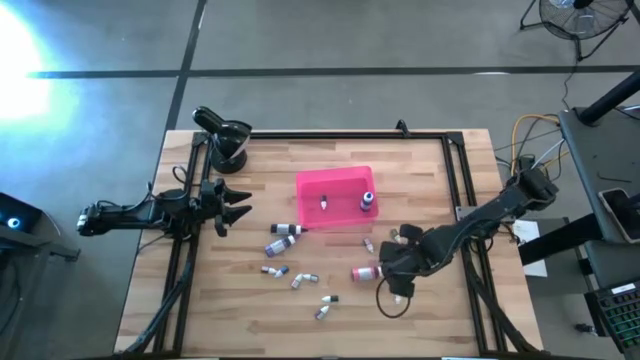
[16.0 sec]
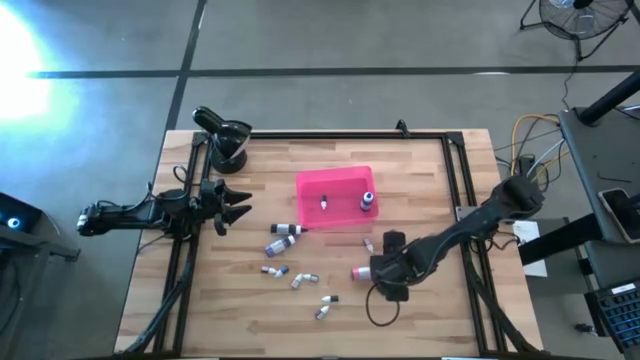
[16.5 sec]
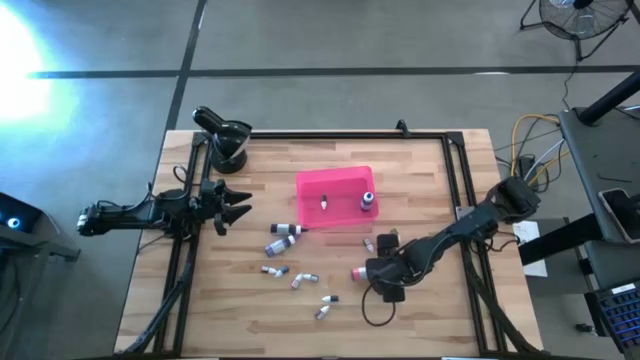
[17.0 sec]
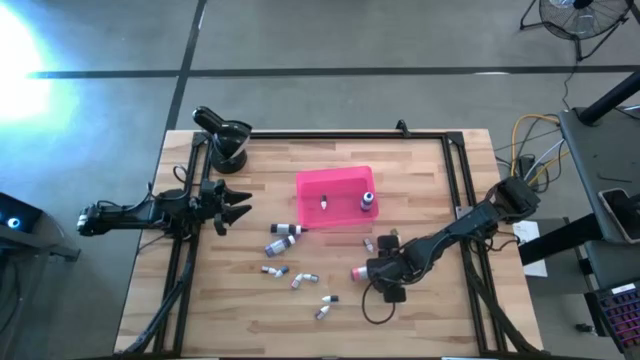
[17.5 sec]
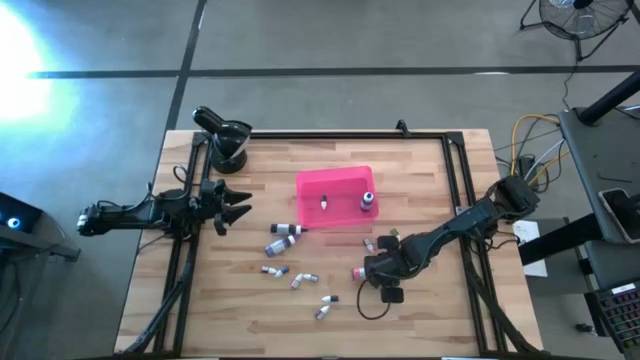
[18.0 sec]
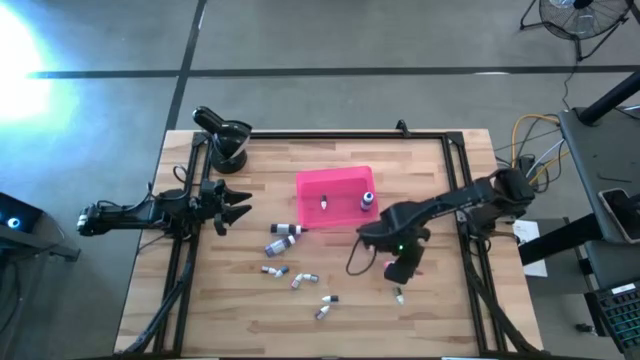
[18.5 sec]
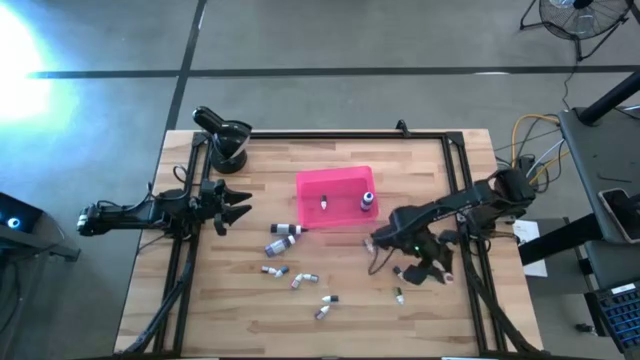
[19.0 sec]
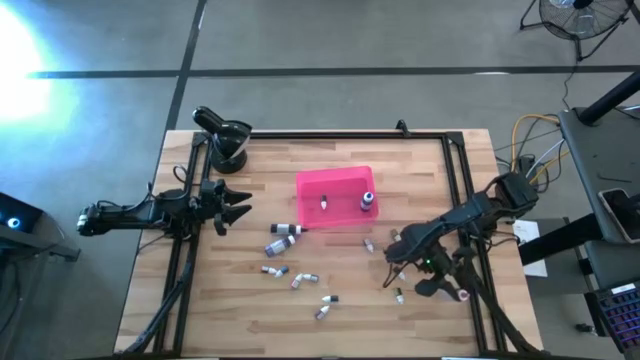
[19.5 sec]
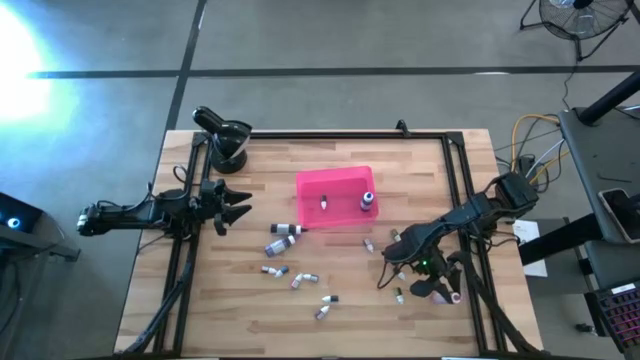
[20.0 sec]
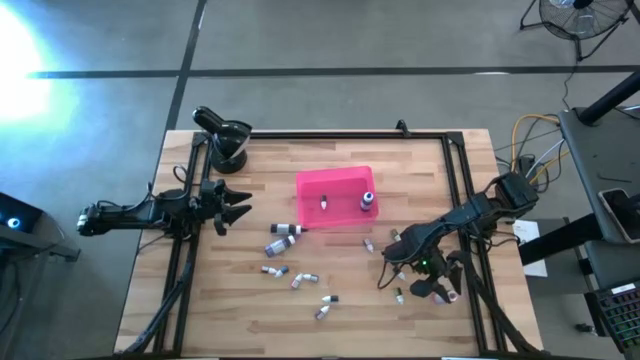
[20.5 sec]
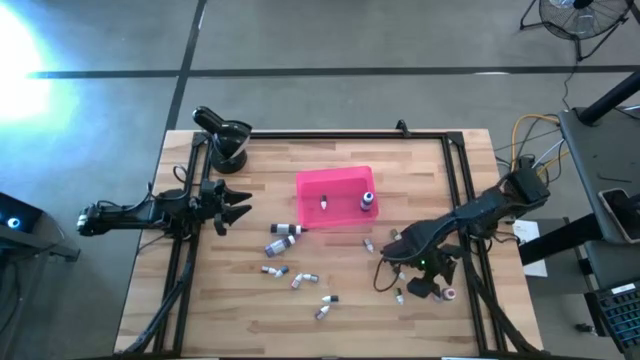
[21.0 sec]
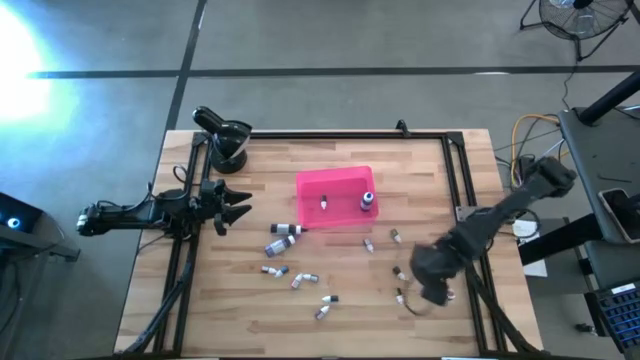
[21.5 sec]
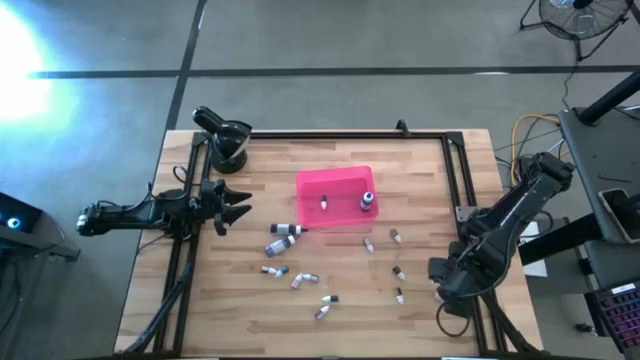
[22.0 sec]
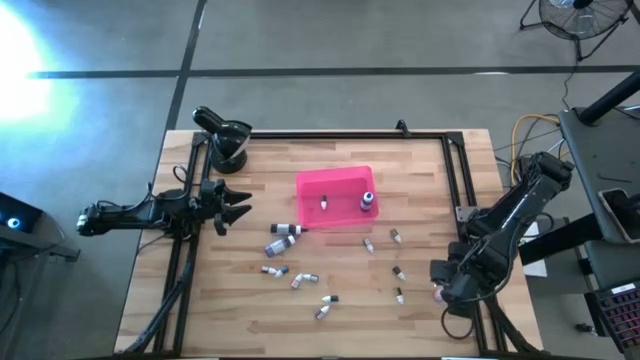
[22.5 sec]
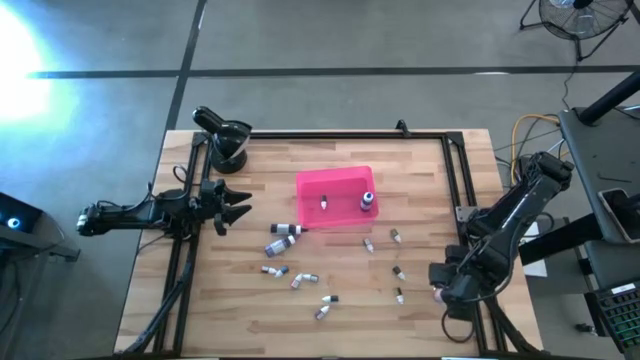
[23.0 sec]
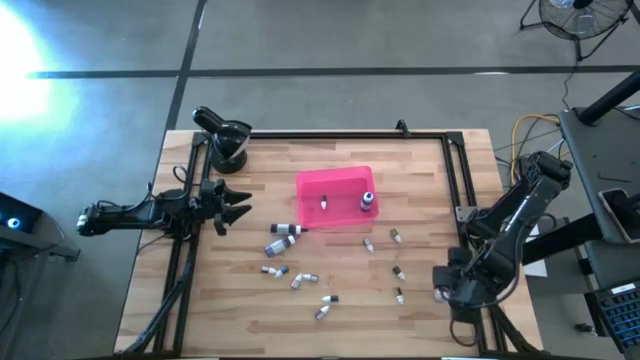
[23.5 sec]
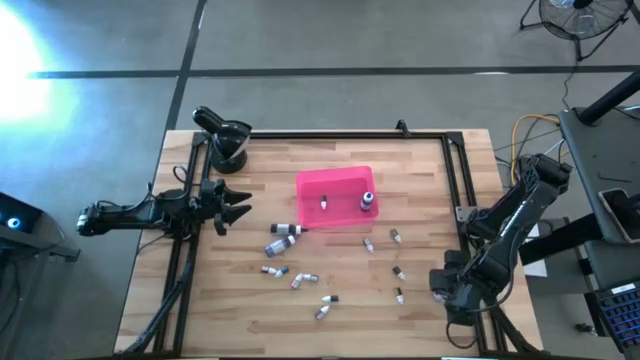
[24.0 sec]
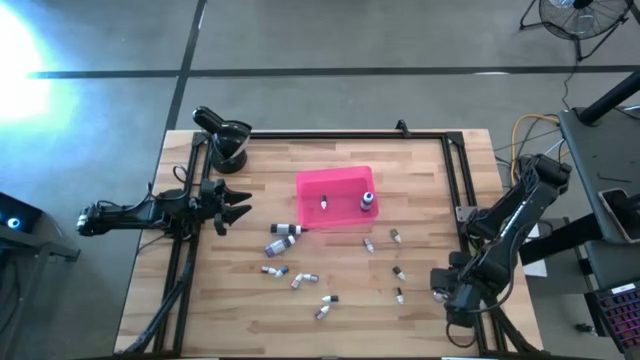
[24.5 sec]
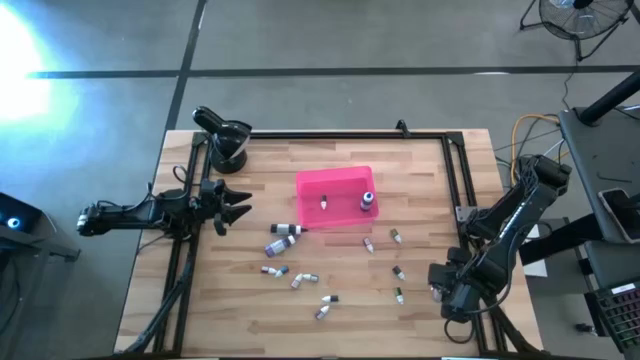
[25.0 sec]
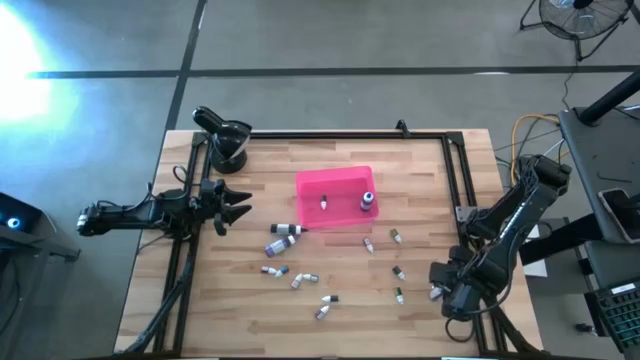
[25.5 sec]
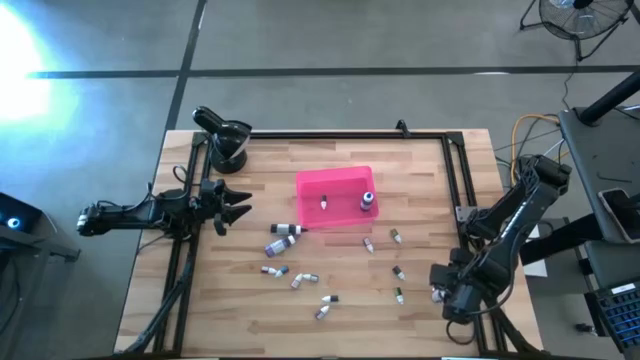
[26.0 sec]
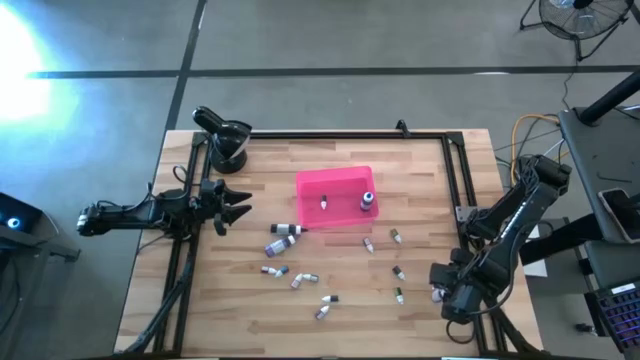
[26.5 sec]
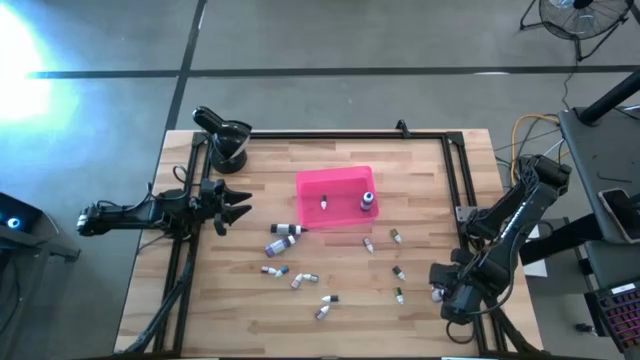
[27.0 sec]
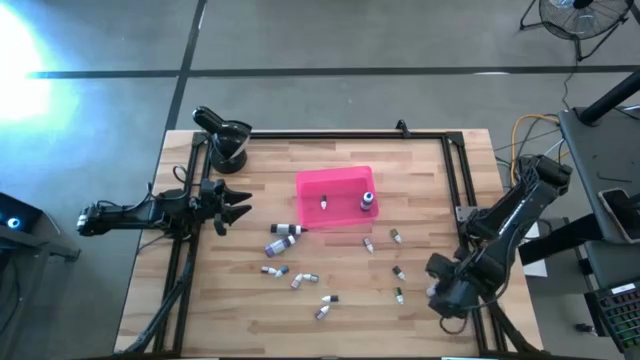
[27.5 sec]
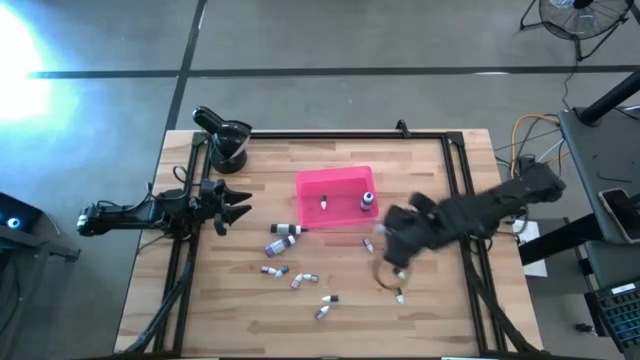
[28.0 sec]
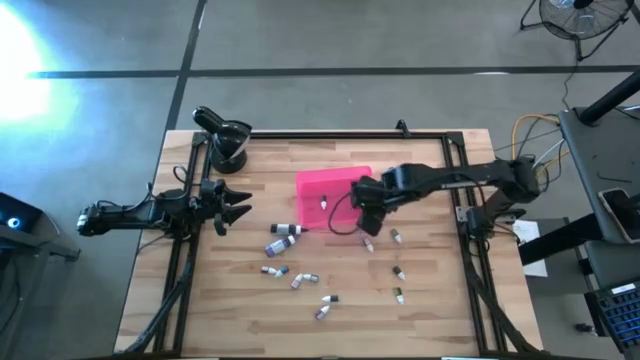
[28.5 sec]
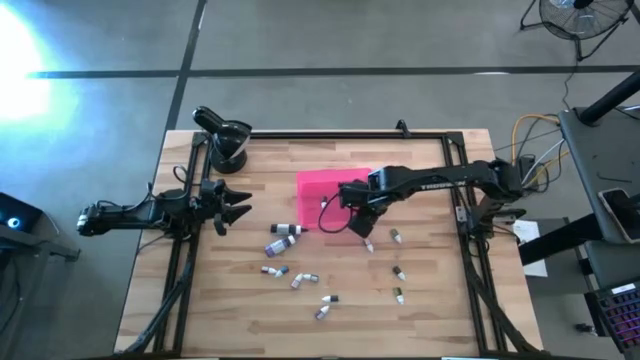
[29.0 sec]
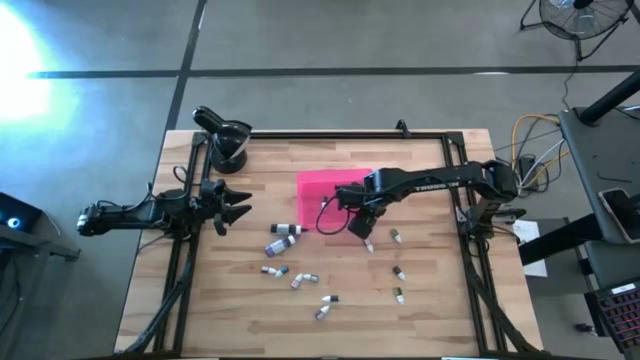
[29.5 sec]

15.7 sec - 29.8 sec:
Task: Pick & Place food coloring
Put the large pink food coloring bottle into the pink bin

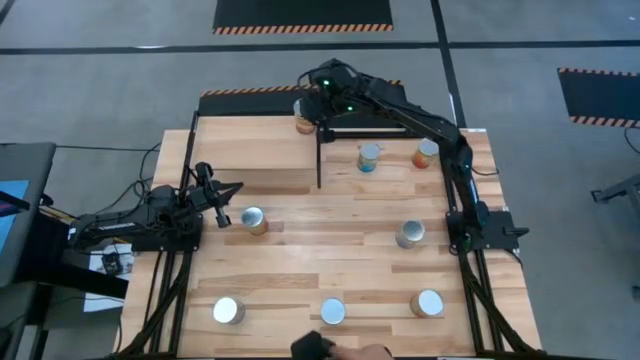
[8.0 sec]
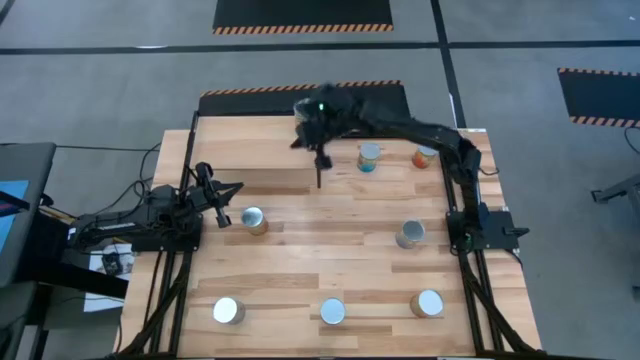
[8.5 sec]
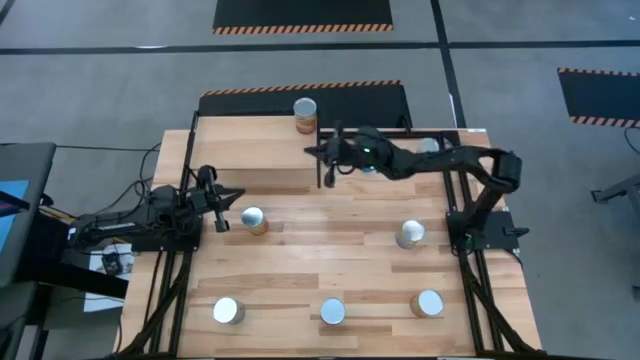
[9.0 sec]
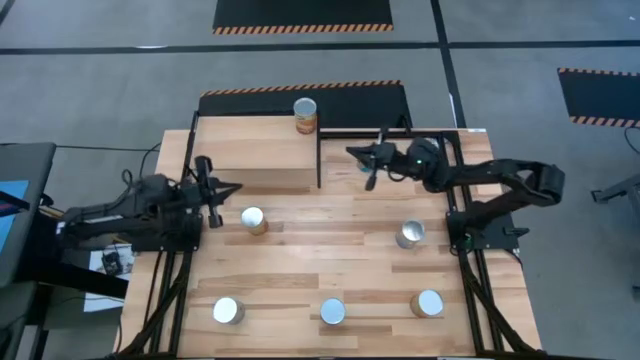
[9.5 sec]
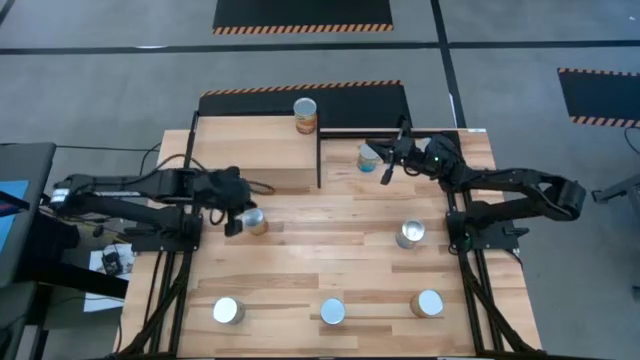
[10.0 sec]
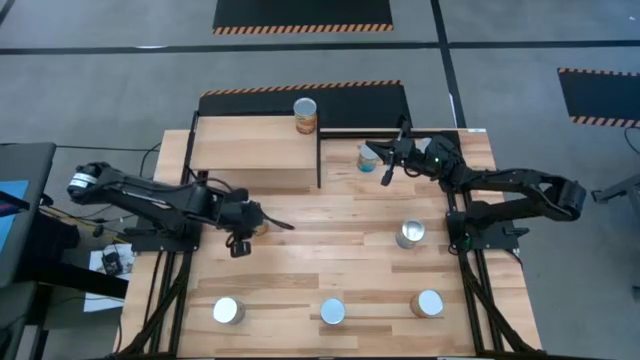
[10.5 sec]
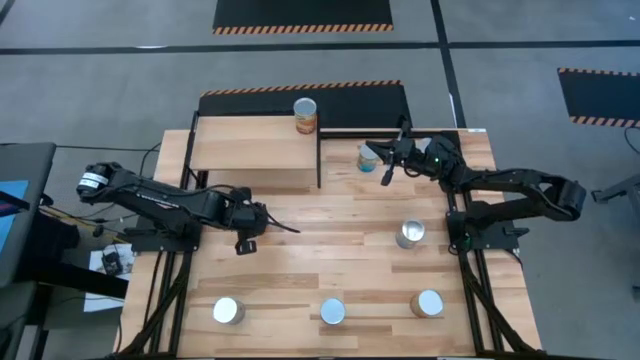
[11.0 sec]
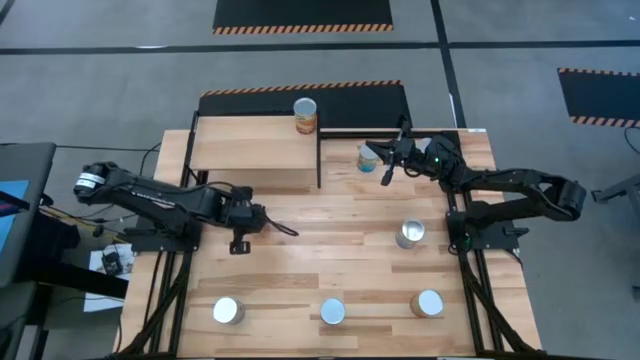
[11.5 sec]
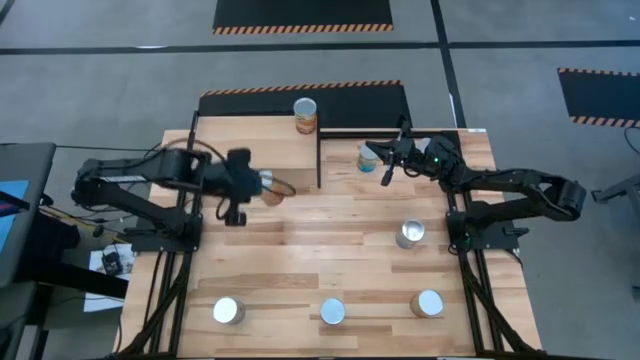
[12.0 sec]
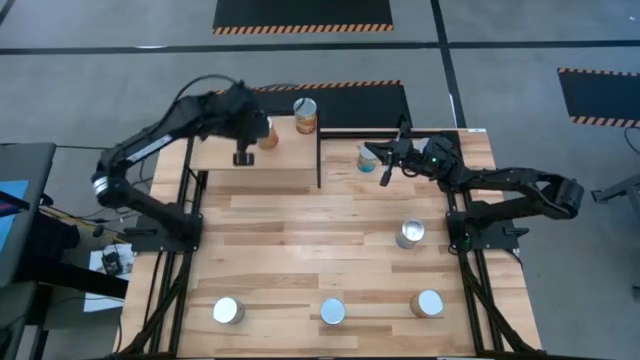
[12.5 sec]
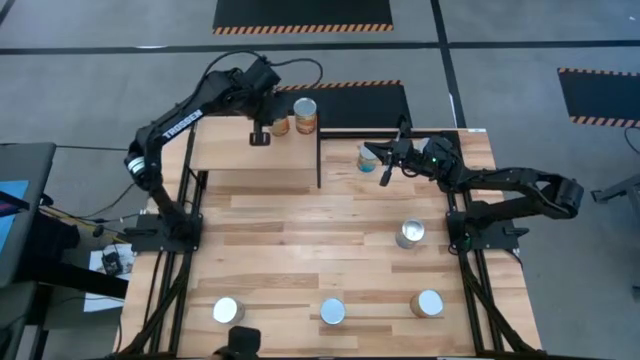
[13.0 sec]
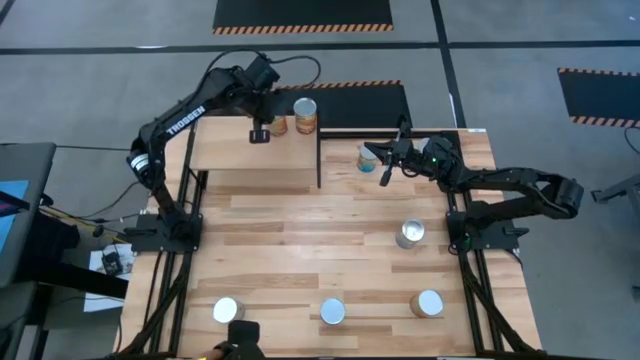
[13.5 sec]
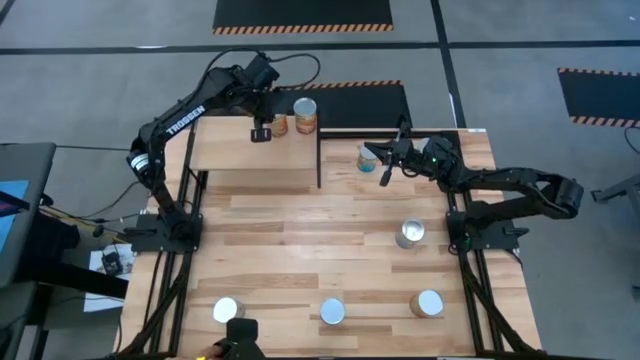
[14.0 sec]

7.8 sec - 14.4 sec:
Task: Pick and place cans onto a shelf
Put the left canned green beans on the shelf
